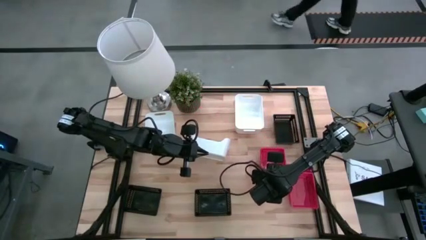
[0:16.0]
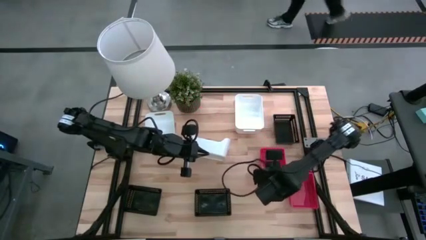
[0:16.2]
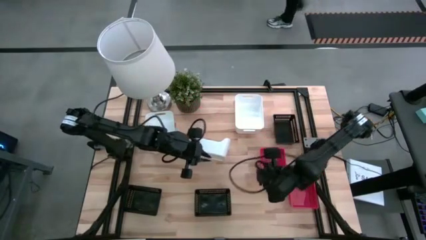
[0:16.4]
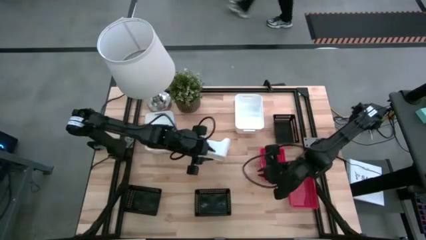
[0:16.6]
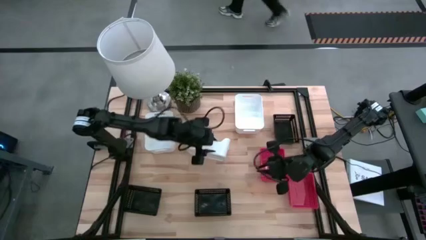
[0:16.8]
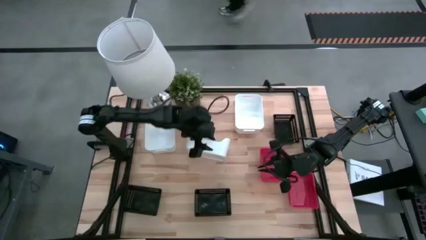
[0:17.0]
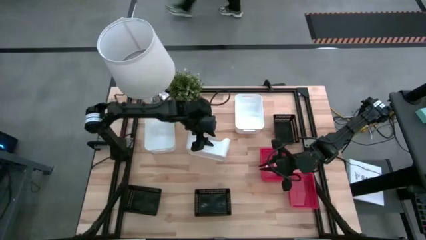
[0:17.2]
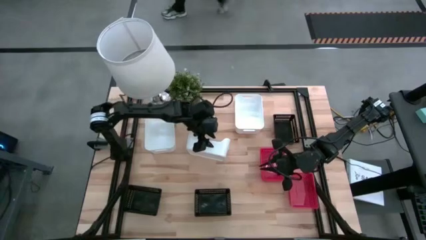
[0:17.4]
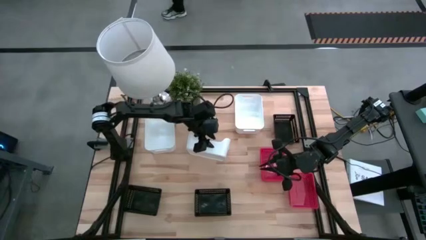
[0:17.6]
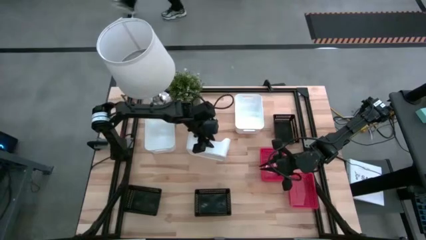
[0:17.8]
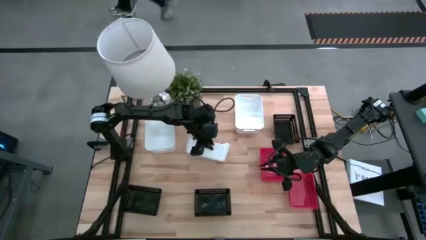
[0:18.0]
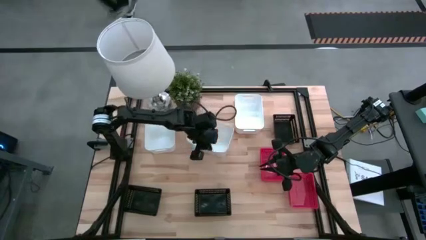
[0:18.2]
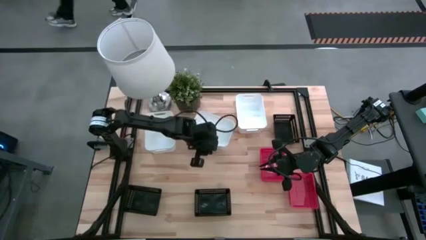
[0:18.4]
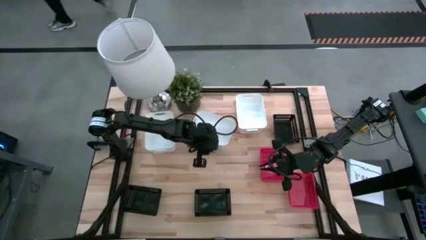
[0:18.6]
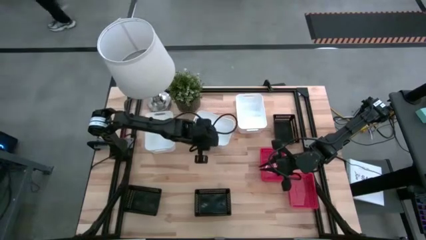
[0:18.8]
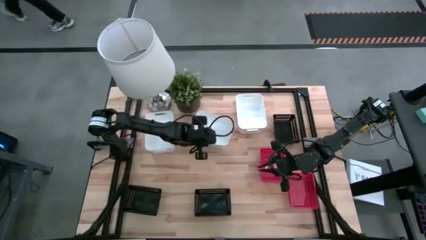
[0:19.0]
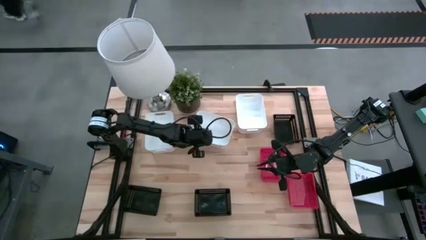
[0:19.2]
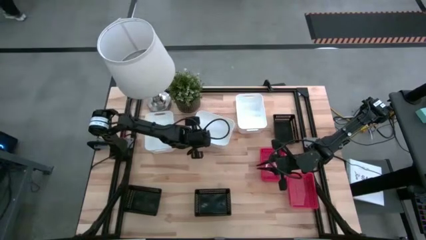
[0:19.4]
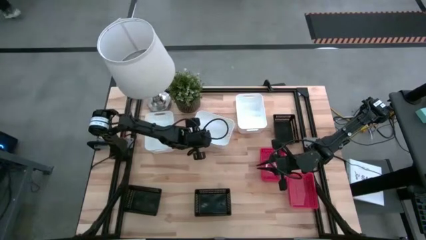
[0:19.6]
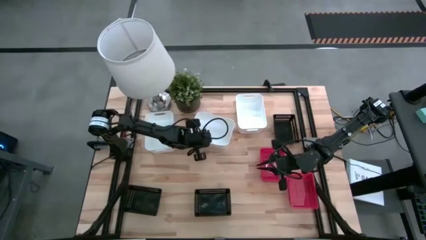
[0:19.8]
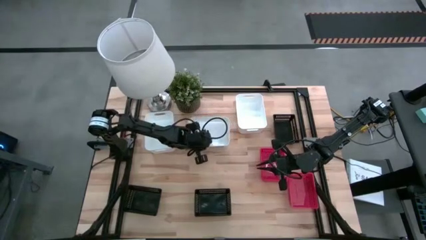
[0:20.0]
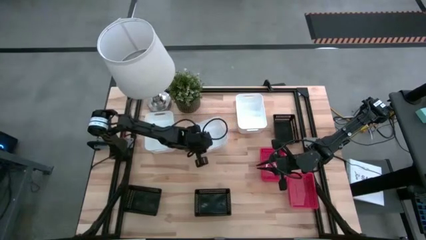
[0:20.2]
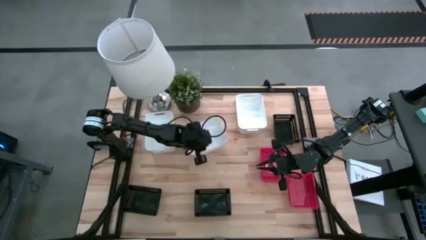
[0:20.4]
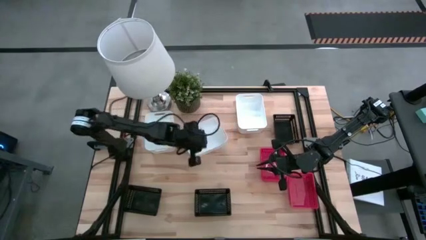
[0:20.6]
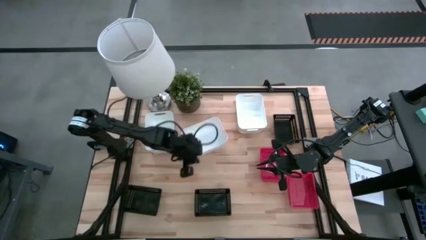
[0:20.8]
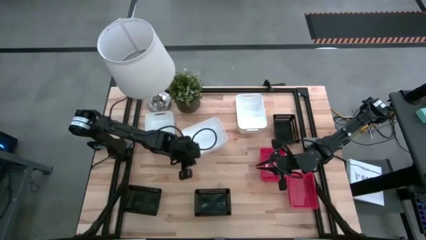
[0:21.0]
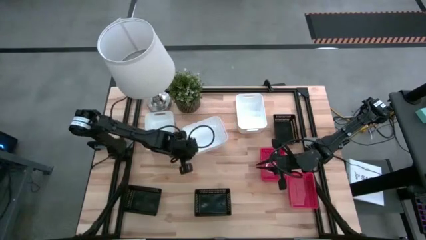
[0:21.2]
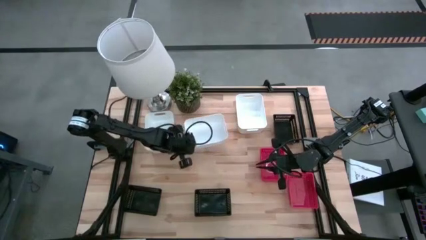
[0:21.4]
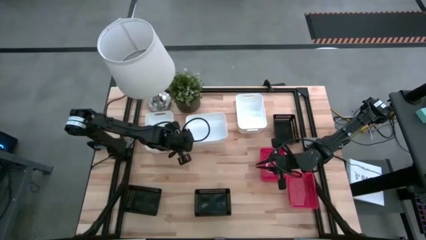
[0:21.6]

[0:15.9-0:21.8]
Adjust the middle white bin on the table

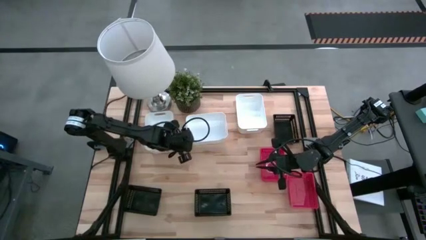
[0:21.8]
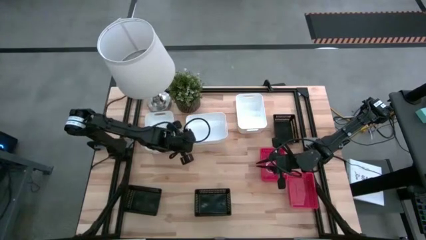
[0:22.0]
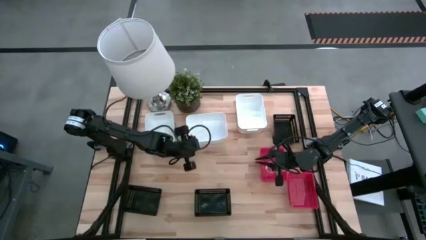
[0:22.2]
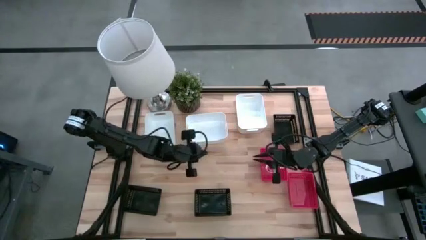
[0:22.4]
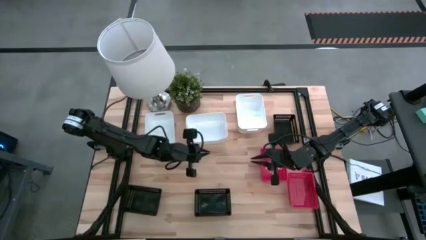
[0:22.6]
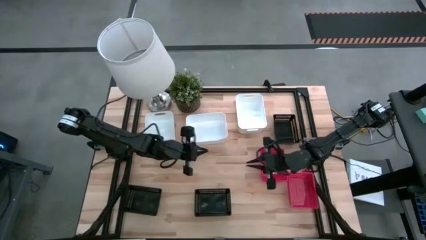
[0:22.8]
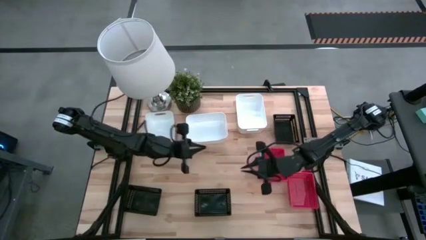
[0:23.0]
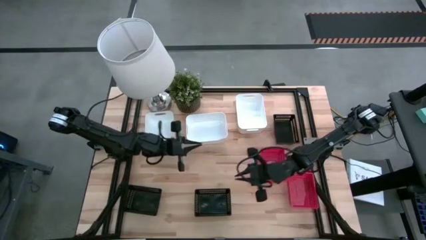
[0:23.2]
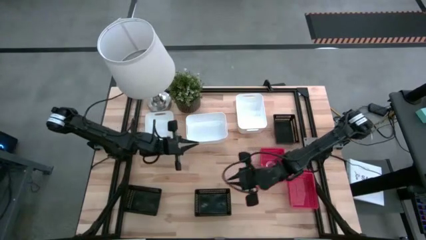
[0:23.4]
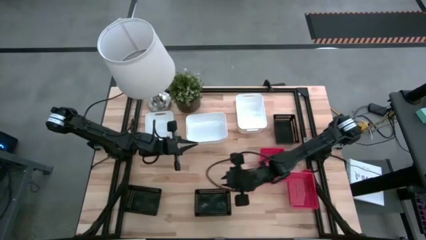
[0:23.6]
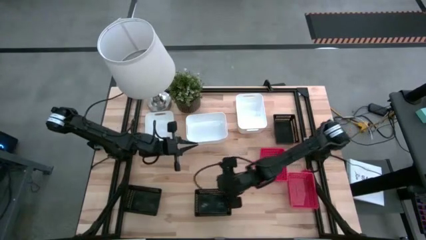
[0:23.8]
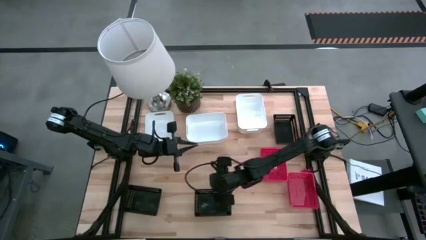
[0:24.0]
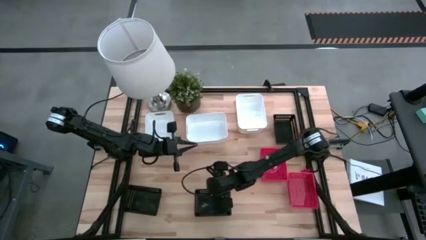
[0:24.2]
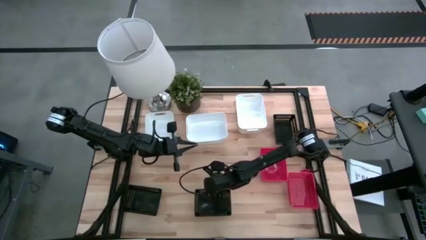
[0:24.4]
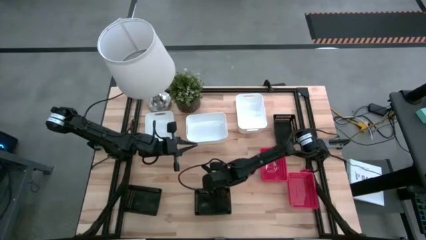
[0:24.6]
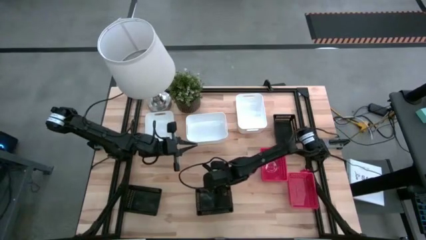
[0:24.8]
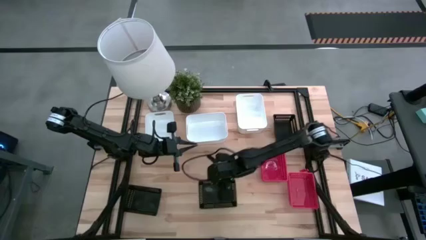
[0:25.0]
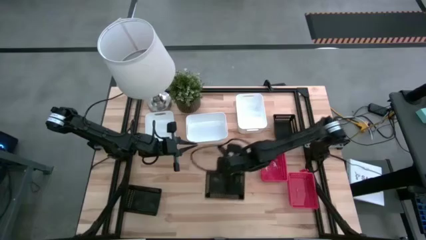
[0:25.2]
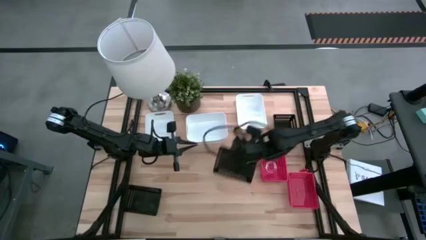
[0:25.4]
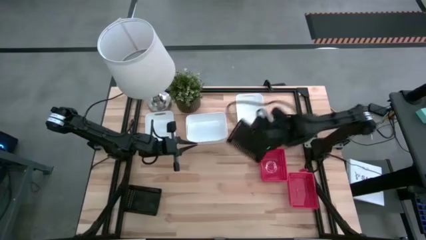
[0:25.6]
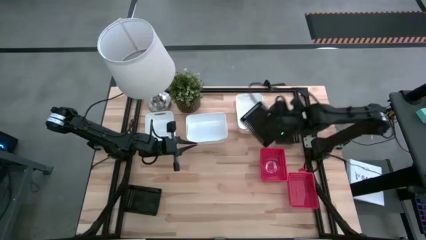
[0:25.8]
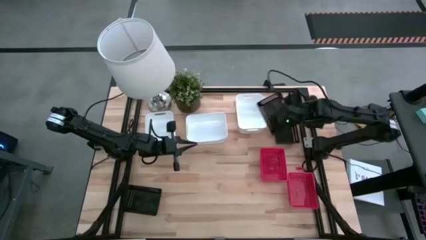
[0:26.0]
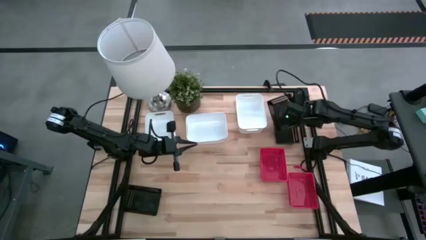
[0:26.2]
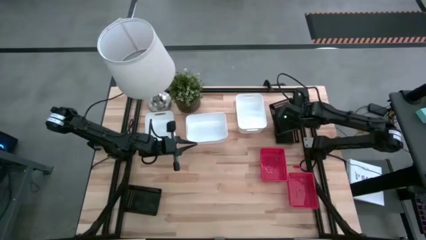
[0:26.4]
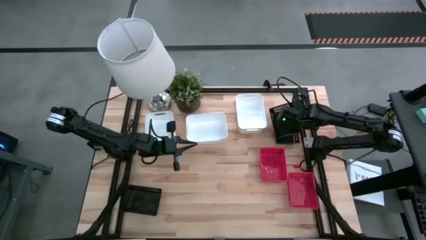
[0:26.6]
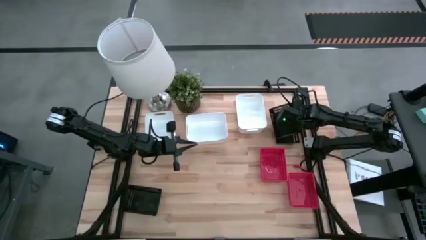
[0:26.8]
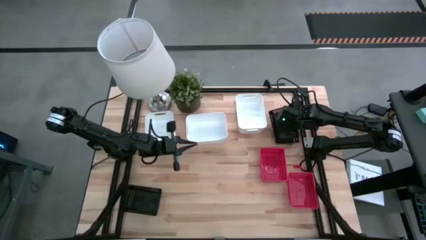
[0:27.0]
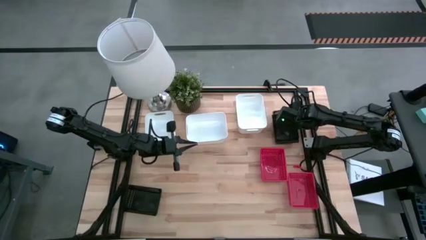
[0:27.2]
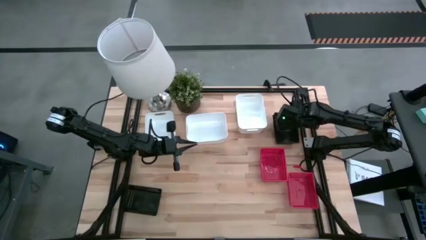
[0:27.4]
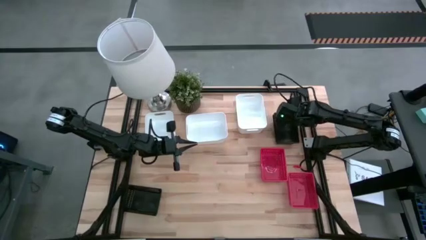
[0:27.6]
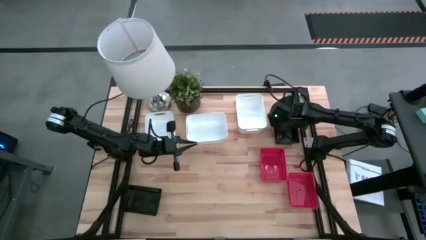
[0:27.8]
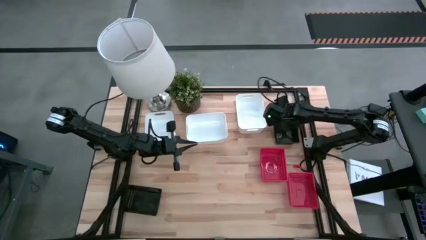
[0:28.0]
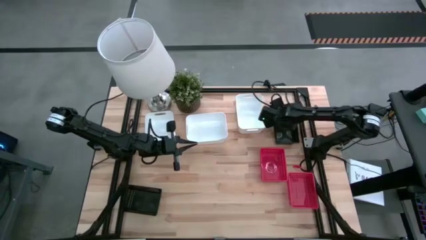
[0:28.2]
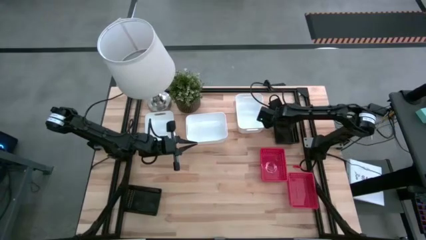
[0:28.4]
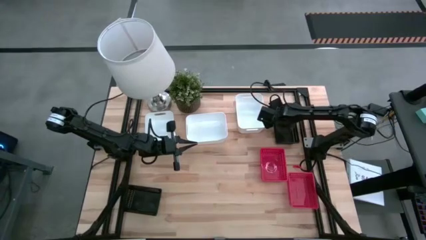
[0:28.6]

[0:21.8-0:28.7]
Stack the bottom right black bin on the top black bin

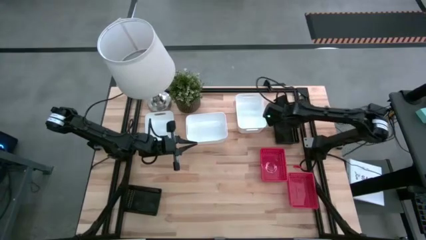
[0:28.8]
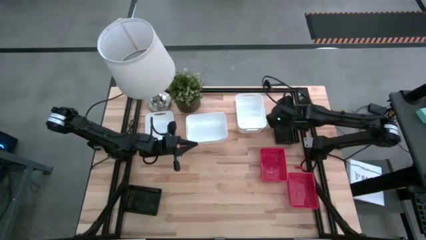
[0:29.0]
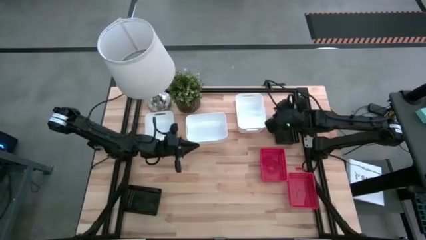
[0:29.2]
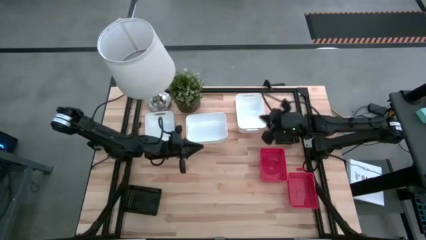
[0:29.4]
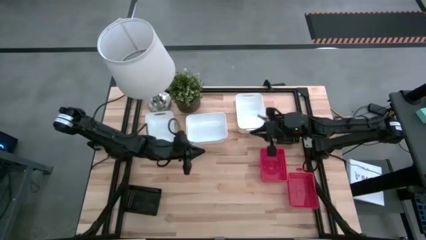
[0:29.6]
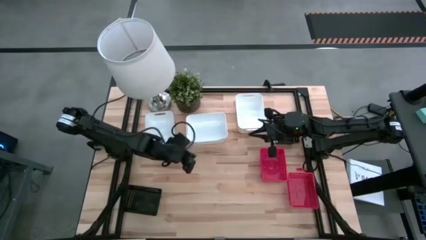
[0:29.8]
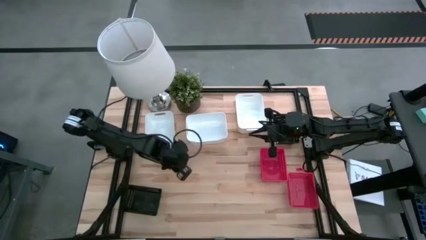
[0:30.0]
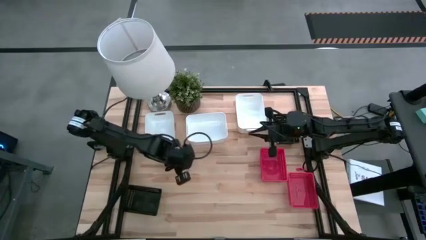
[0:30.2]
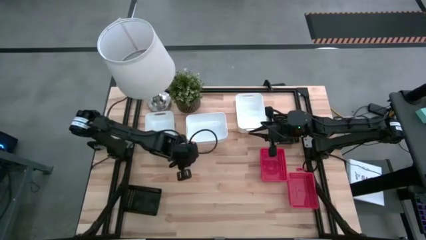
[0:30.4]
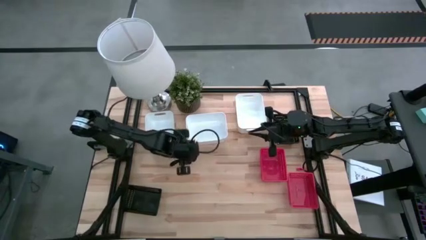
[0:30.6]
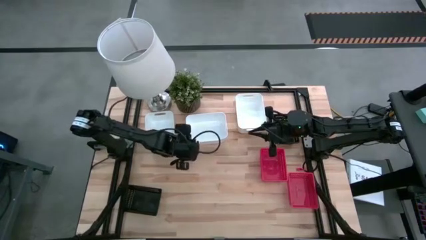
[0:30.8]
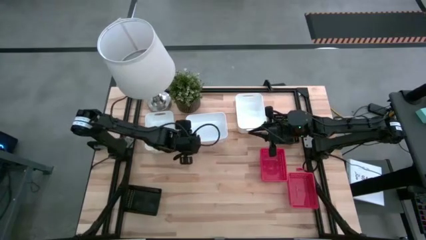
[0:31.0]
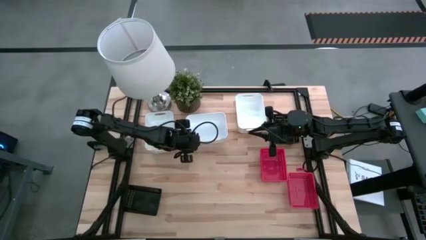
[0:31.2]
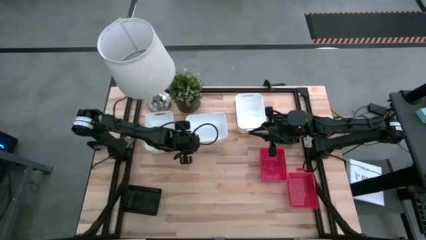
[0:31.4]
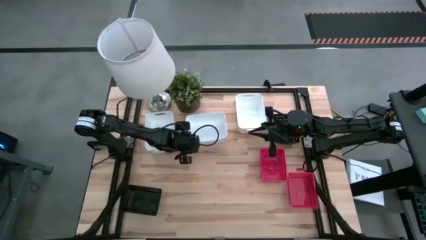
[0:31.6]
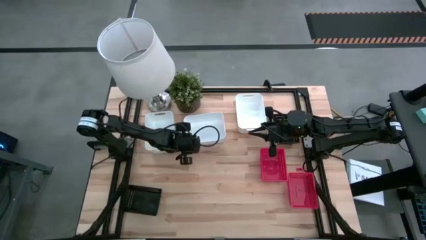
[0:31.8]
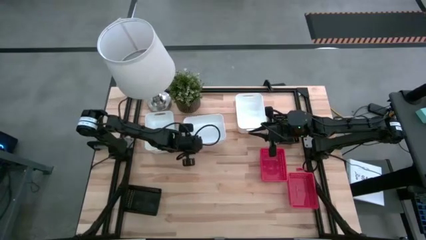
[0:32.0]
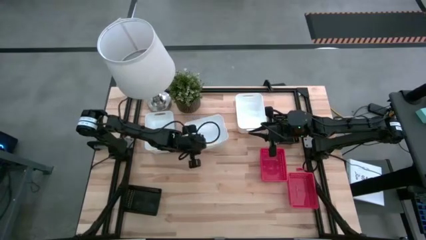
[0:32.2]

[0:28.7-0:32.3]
Stack the middle white bin on the left white bin
